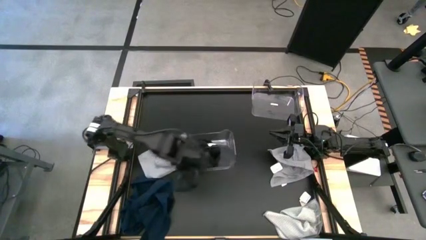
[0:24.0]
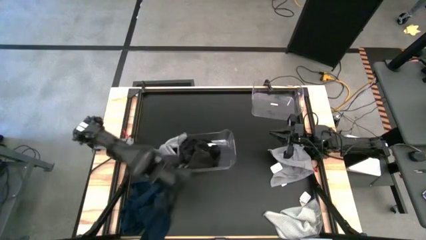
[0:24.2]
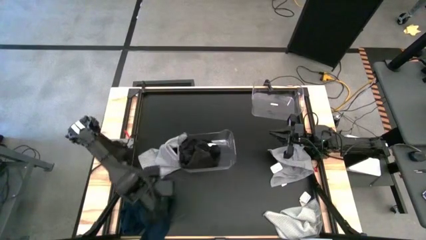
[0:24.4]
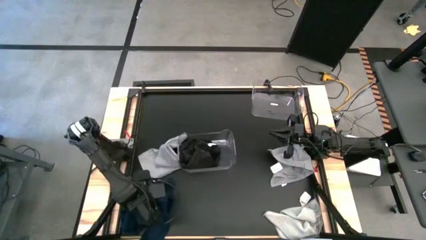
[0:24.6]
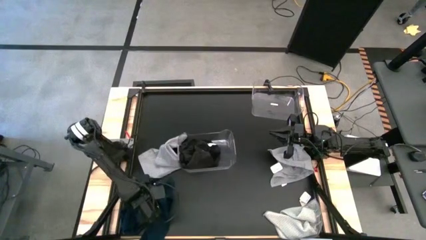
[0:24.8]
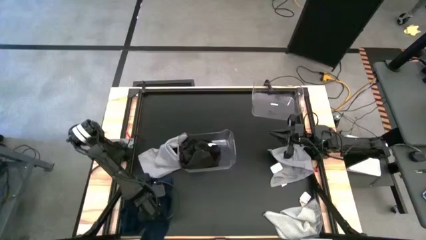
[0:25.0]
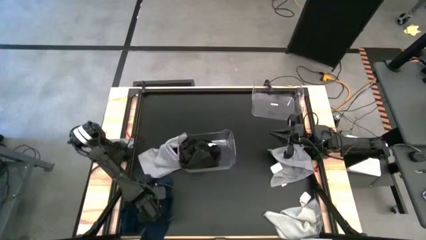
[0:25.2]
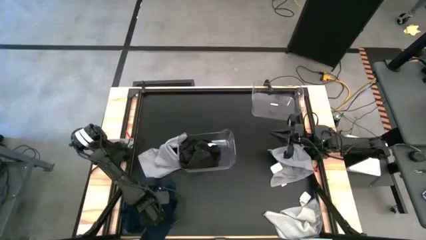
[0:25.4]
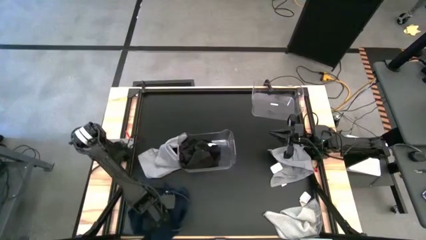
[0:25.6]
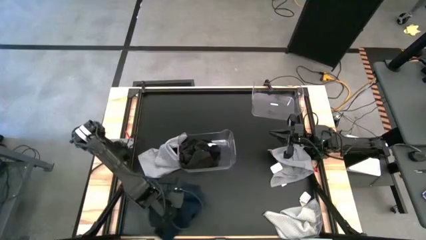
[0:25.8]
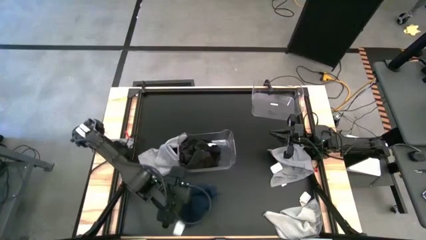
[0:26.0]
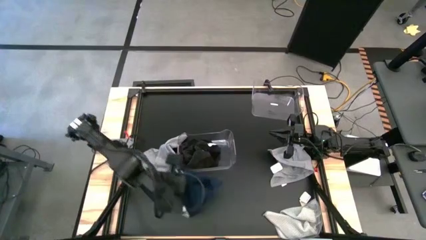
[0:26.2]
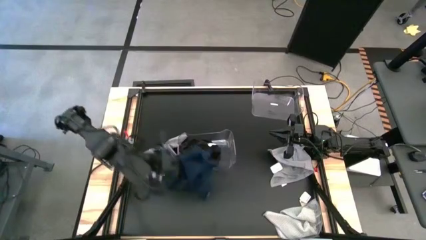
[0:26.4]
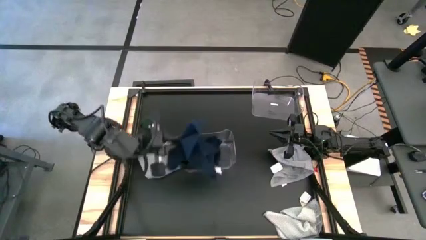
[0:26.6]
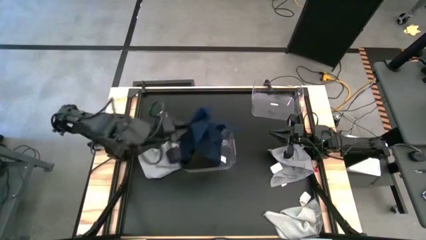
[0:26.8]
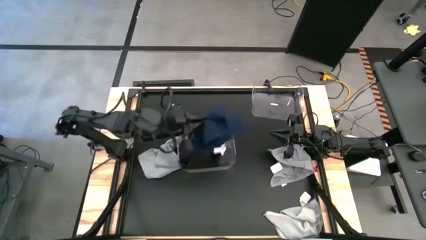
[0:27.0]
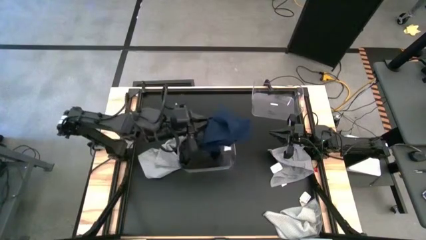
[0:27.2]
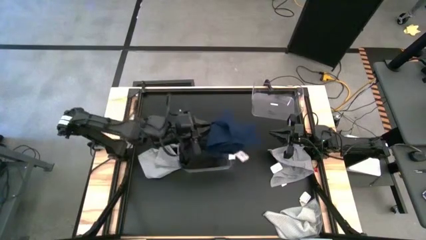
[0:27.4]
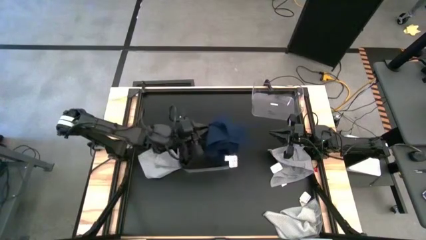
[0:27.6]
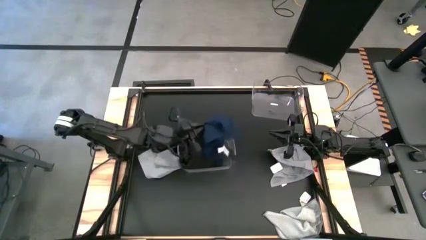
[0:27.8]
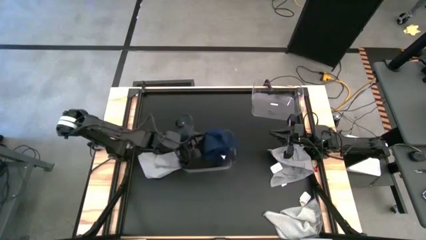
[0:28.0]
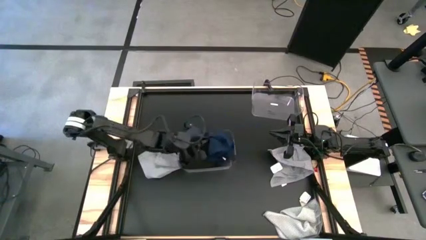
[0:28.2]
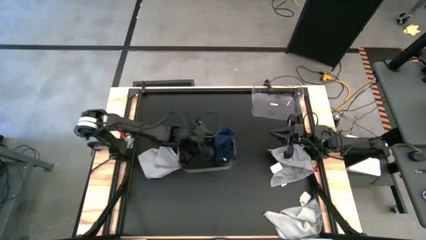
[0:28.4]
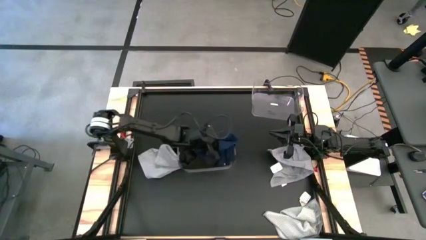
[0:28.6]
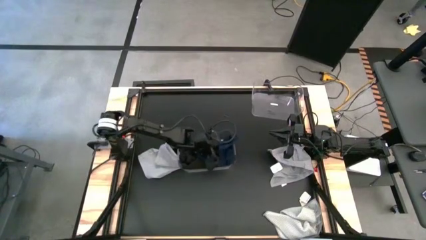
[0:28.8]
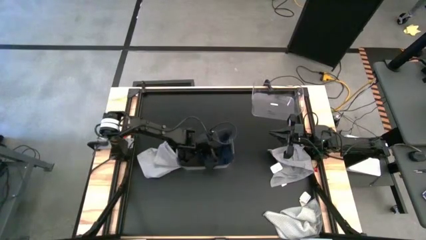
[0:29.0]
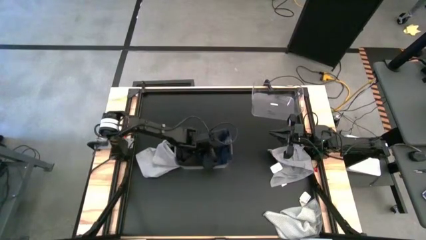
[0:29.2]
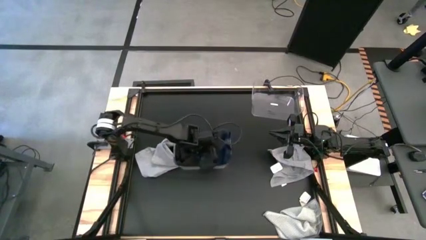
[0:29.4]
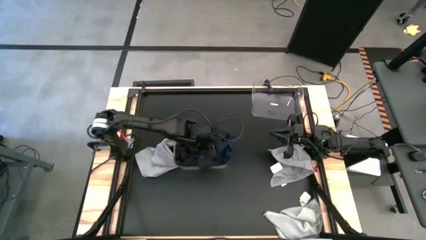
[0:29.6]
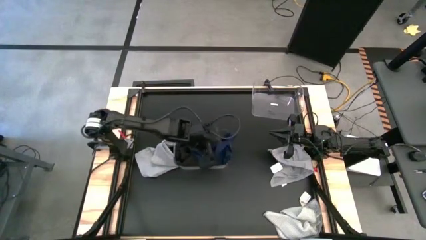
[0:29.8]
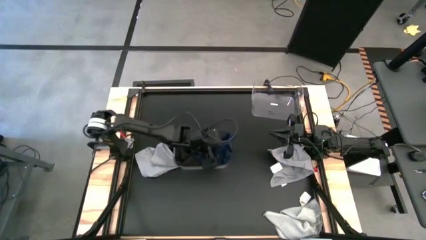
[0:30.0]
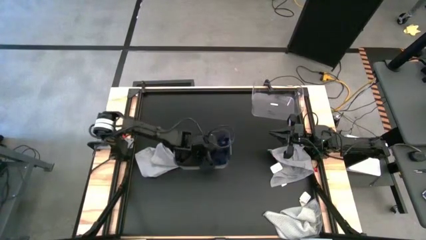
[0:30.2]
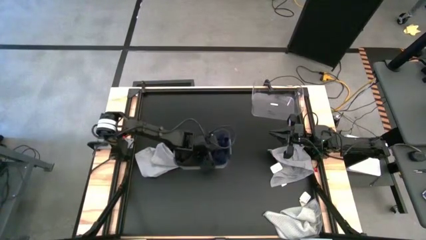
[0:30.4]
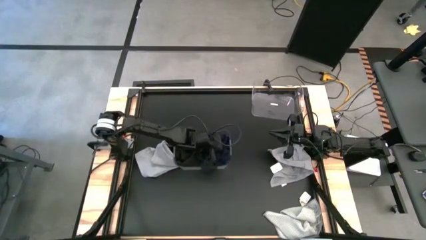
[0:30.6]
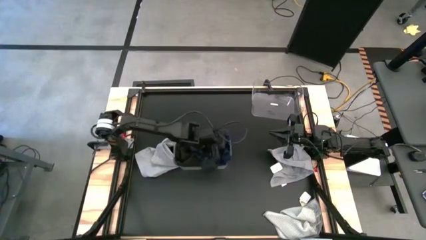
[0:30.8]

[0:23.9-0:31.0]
Task: Sort towels by color in basket
Put the blue towel into the bottom transparent bin

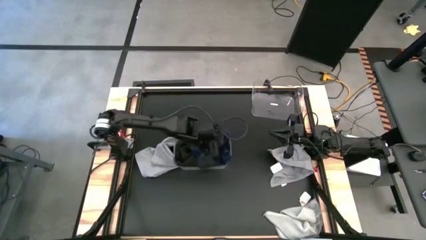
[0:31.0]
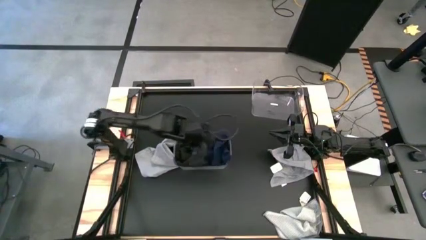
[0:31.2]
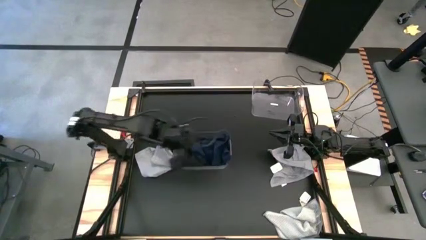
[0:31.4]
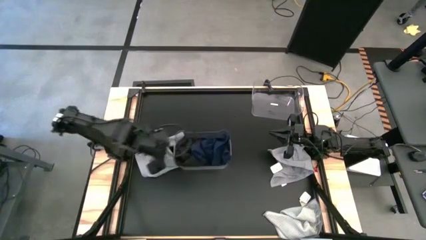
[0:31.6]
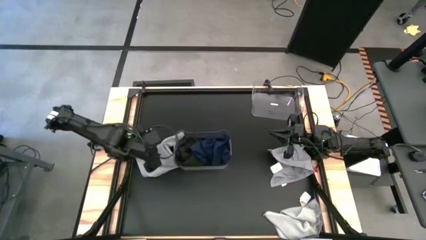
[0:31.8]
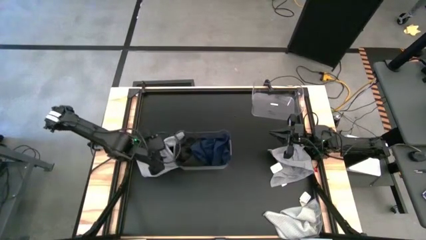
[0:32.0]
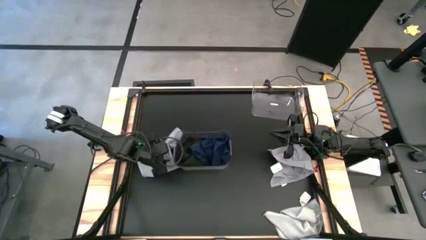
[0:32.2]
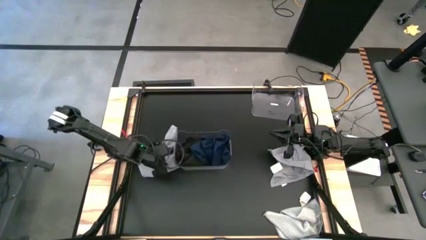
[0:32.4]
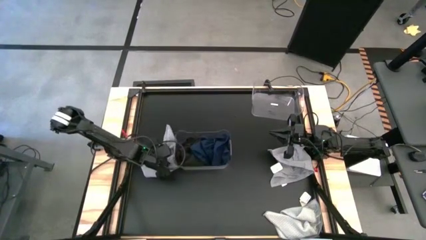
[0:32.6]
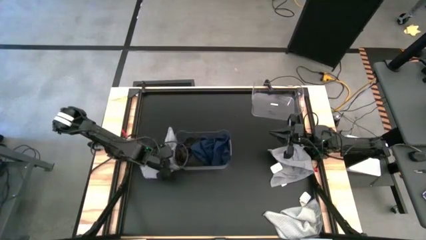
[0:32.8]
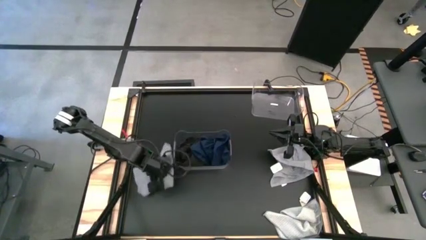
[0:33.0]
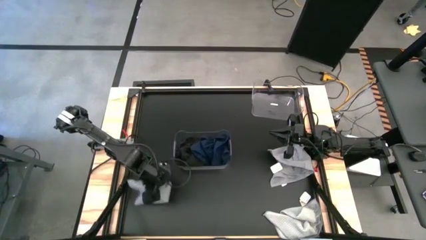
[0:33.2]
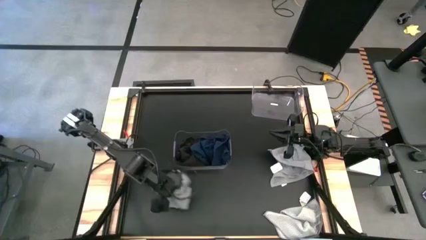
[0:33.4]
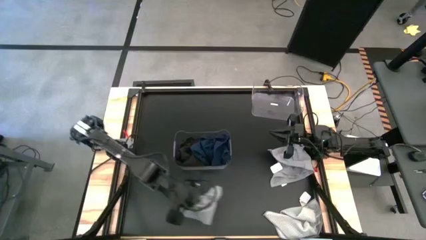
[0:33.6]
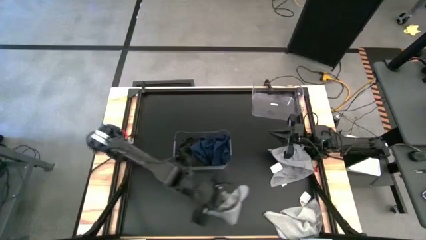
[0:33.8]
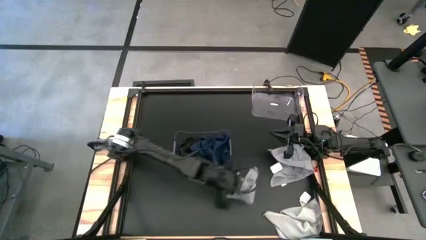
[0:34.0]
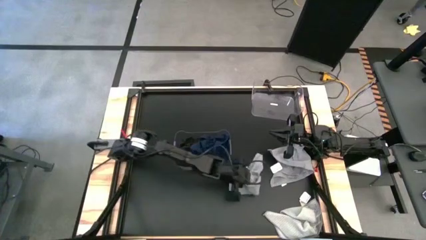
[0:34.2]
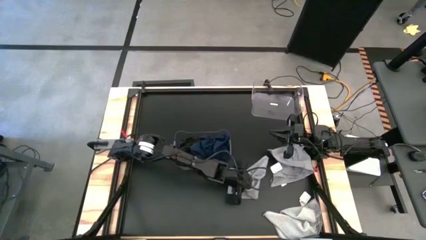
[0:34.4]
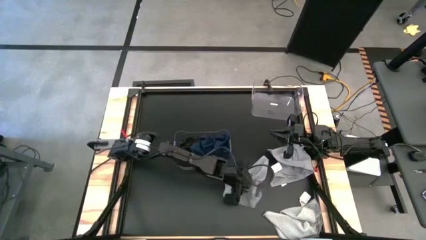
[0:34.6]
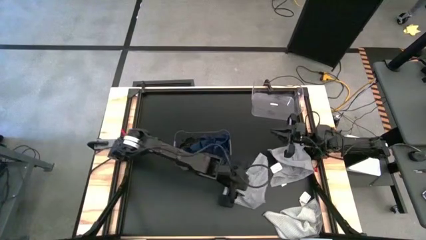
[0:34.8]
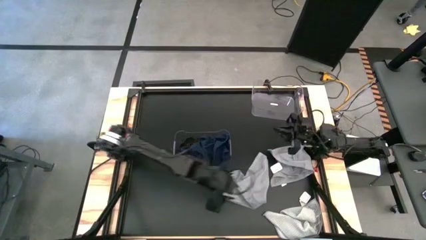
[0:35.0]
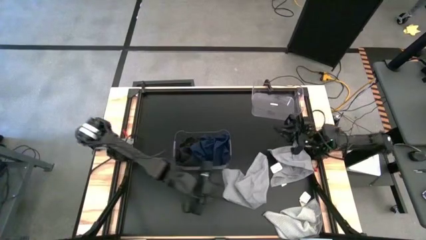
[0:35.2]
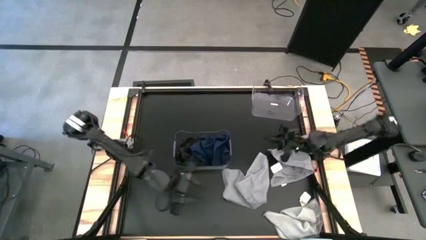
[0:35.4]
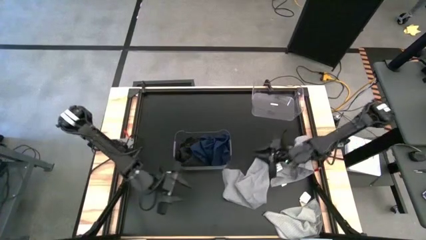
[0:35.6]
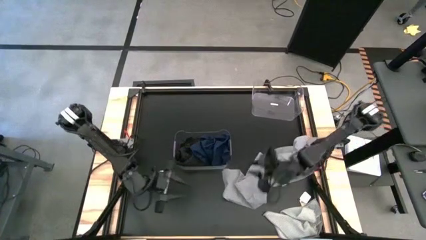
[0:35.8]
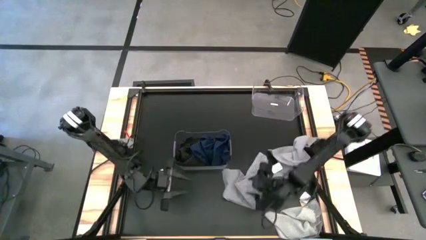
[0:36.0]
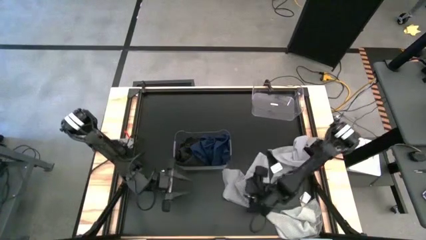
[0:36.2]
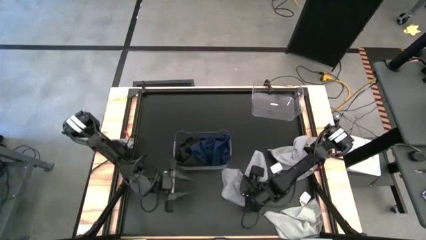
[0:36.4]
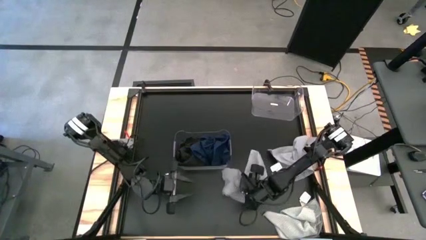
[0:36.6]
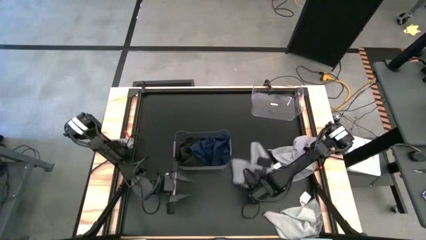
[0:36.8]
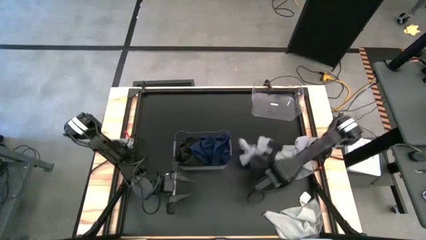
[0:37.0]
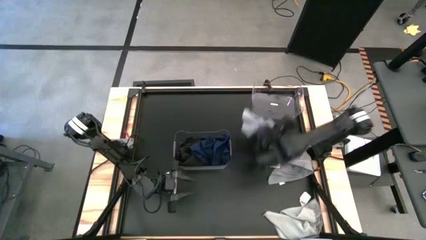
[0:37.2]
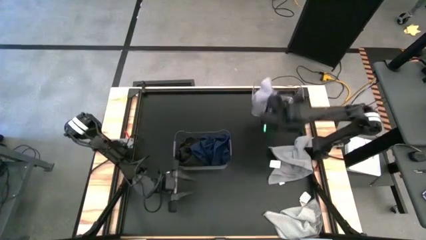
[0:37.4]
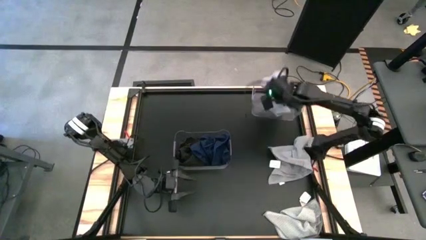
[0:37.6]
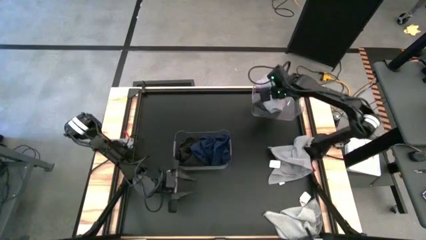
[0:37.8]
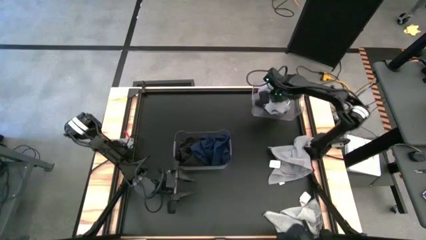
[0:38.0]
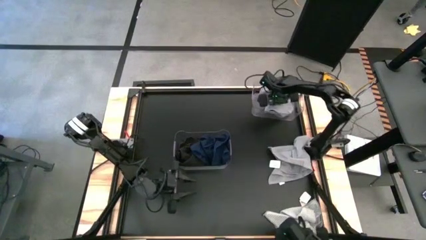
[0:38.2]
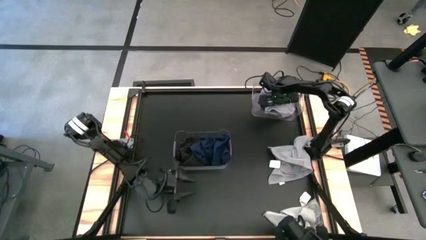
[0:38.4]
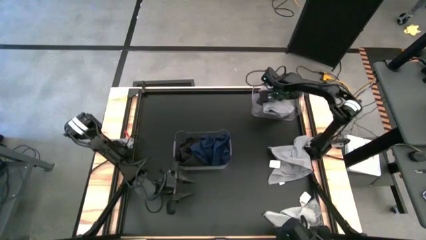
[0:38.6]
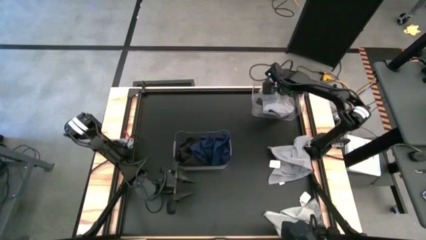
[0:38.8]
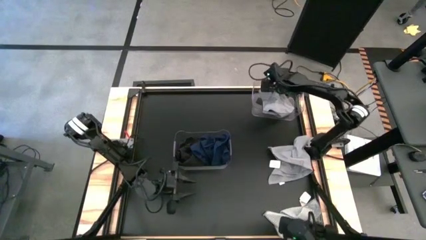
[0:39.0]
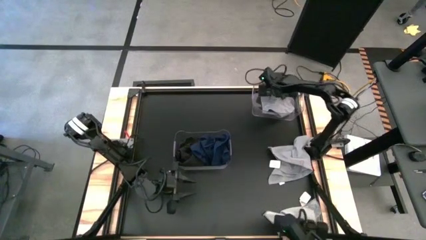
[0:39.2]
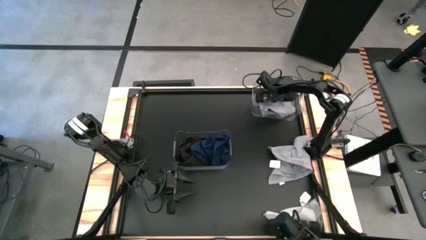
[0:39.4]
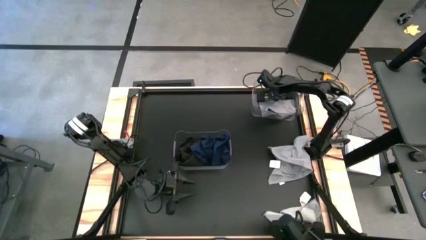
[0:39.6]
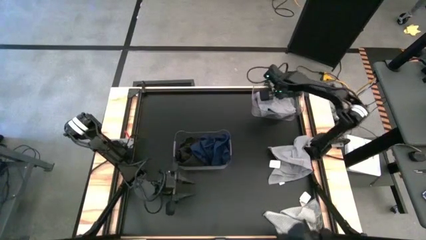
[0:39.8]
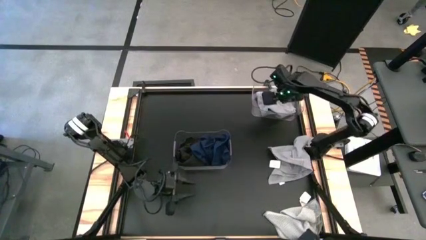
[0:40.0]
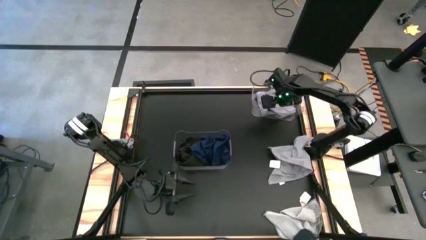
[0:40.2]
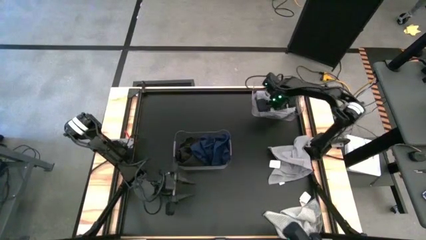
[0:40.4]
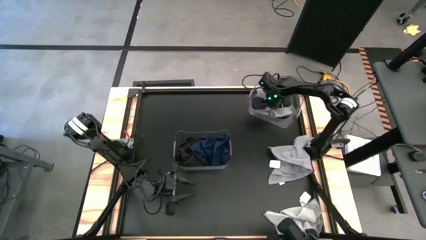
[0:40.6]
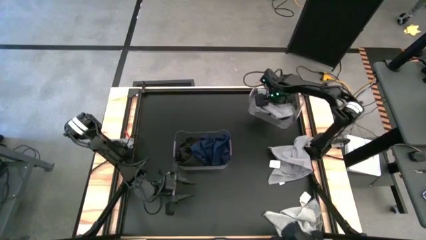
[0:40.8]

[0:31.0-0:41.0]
Put the left gray towel into the top transparent bin
